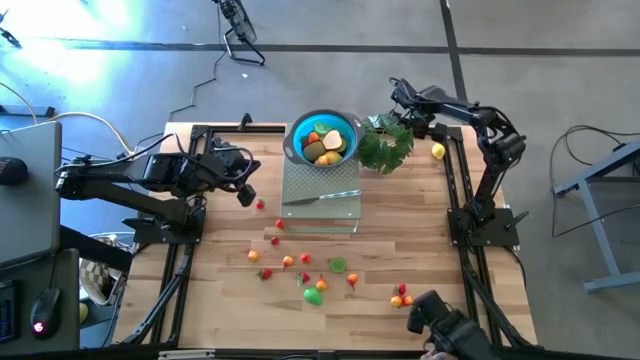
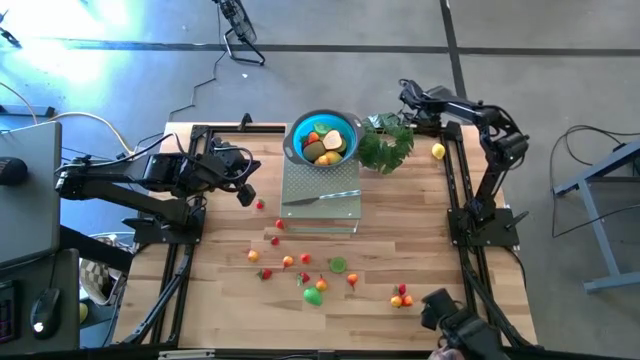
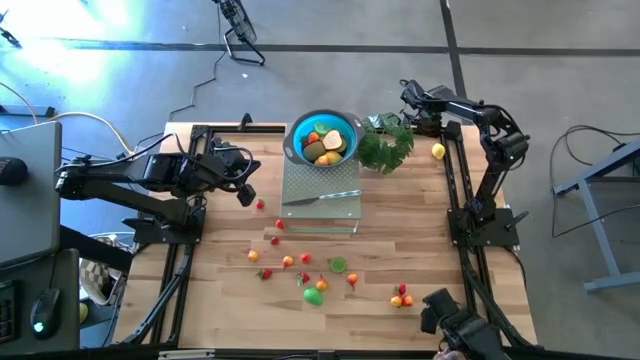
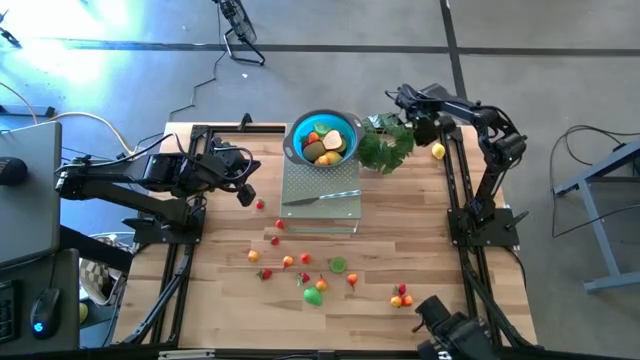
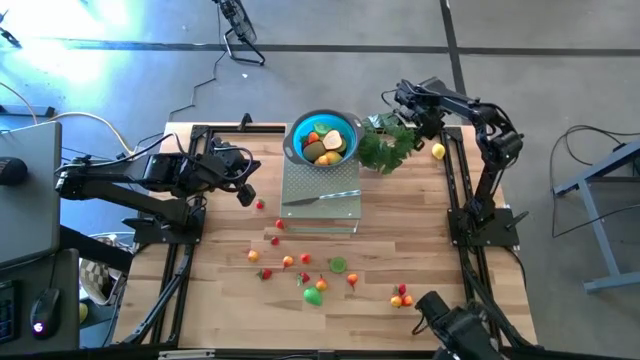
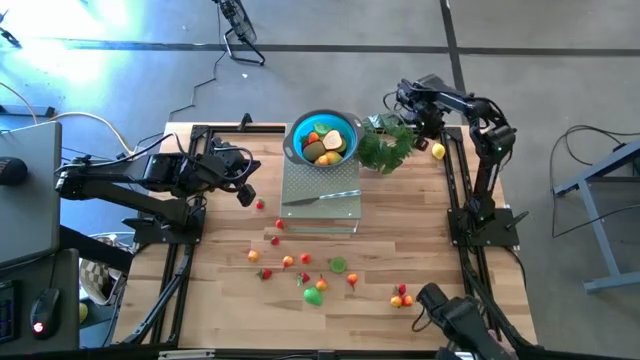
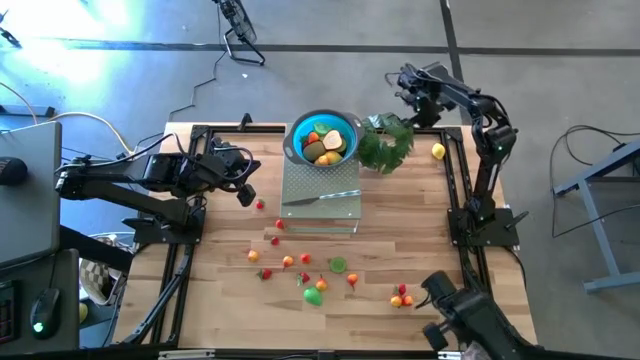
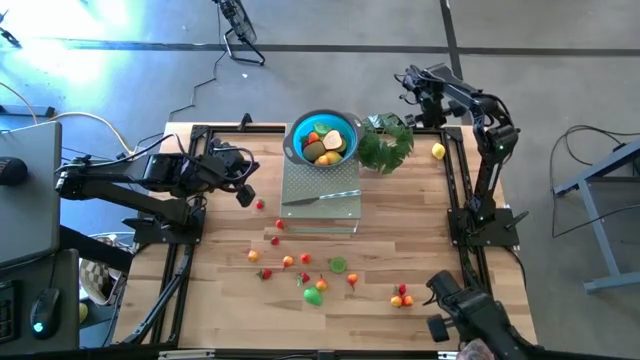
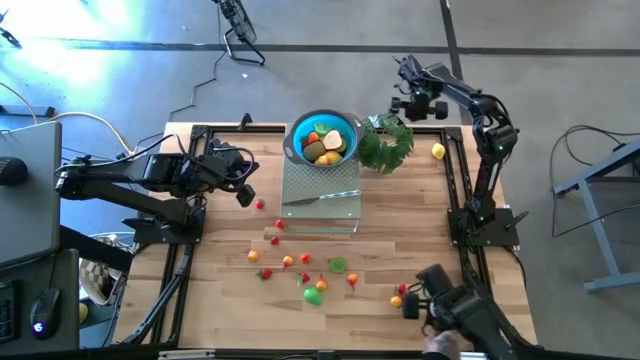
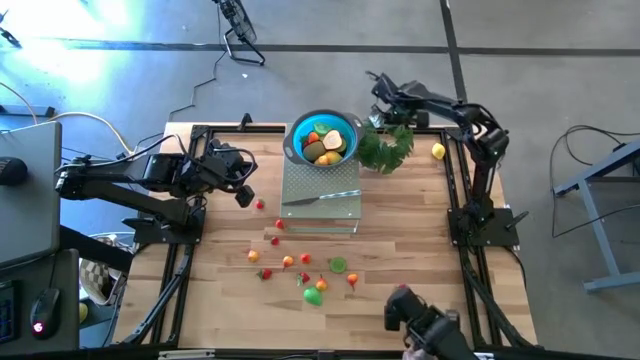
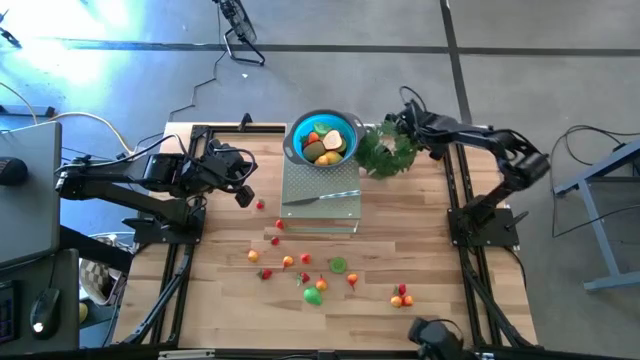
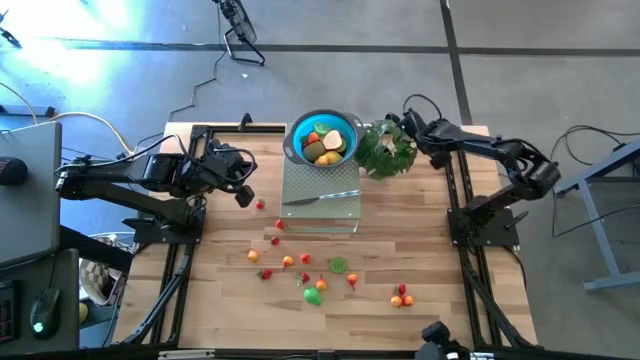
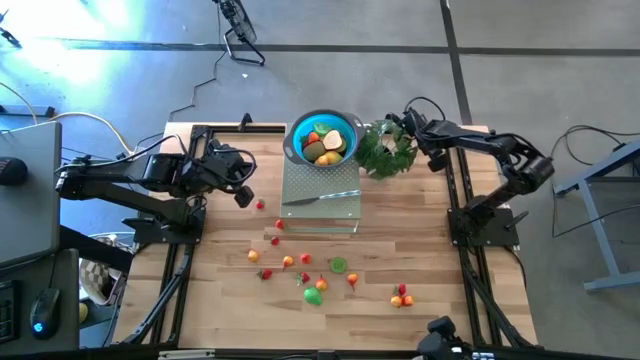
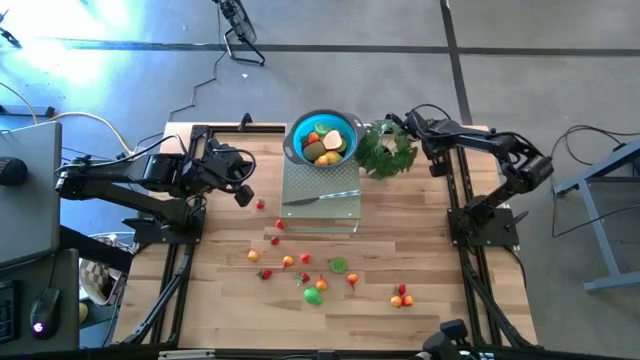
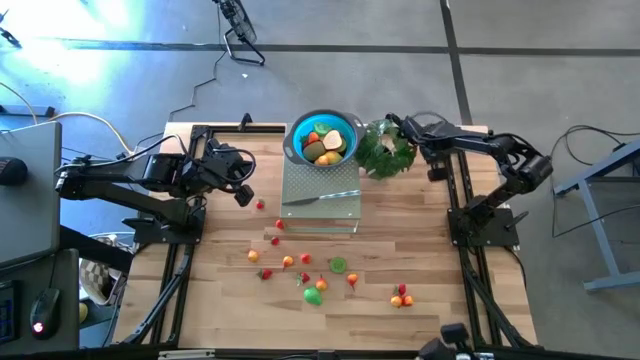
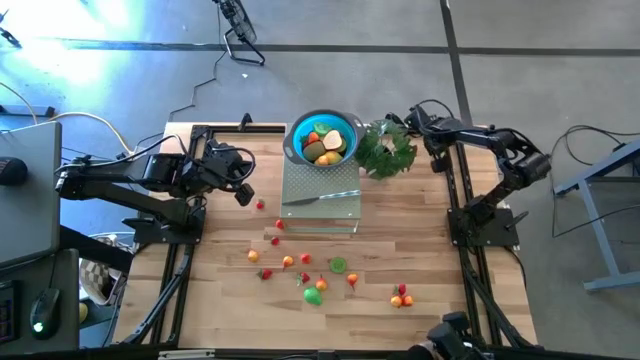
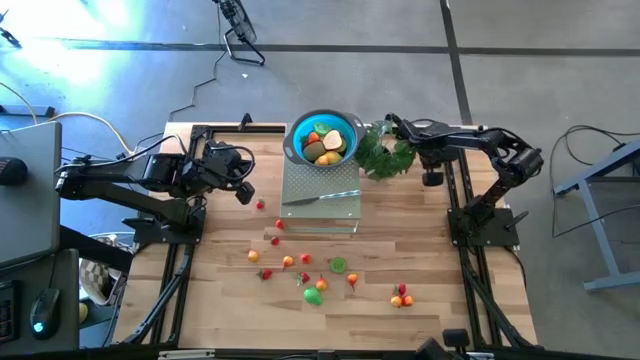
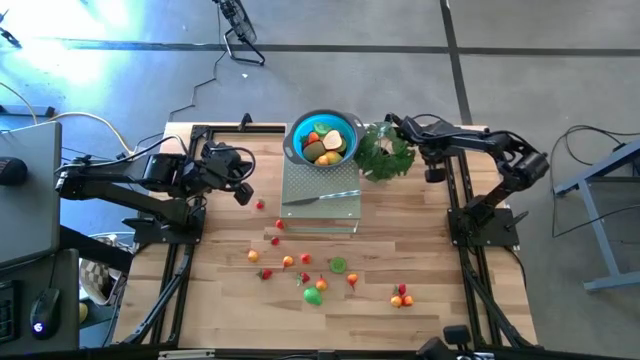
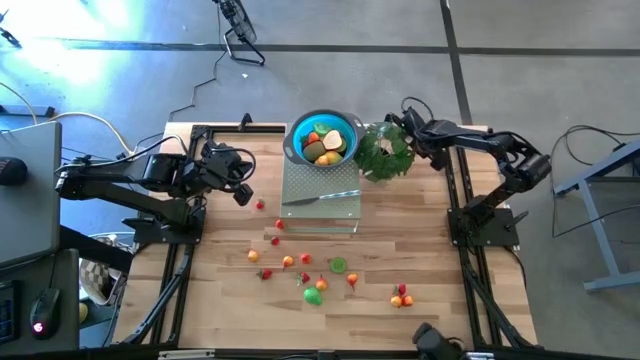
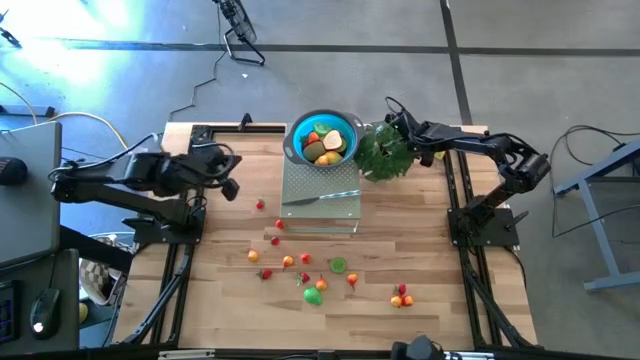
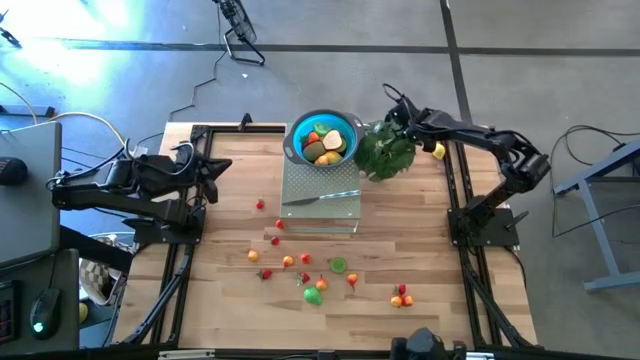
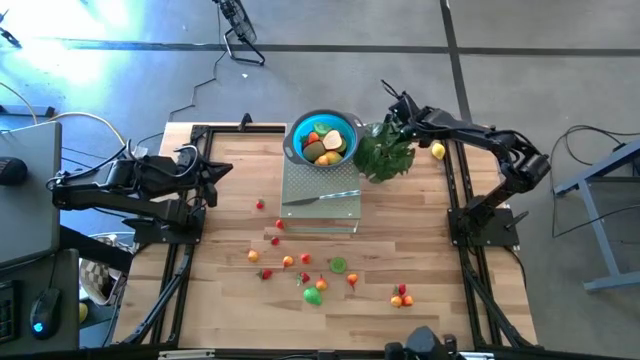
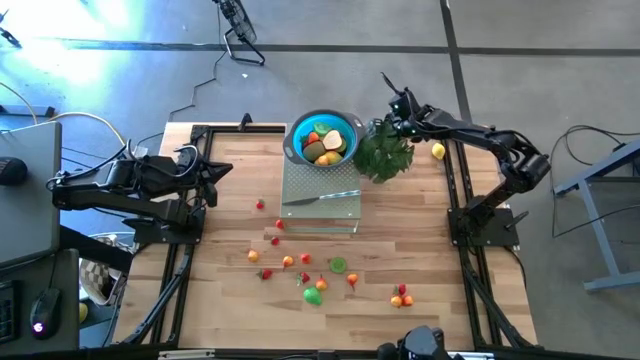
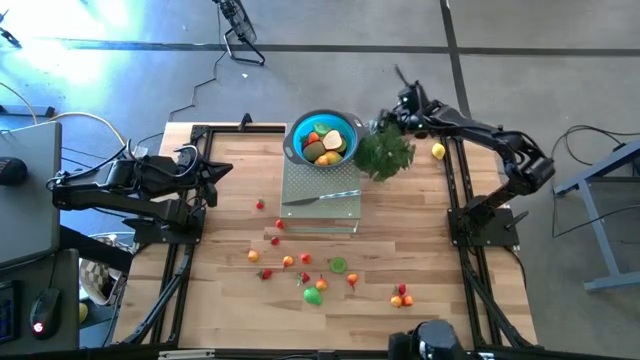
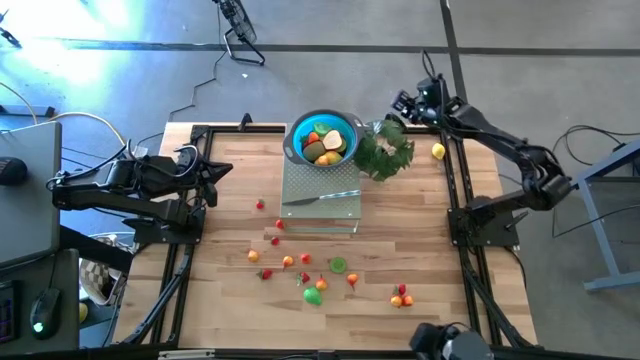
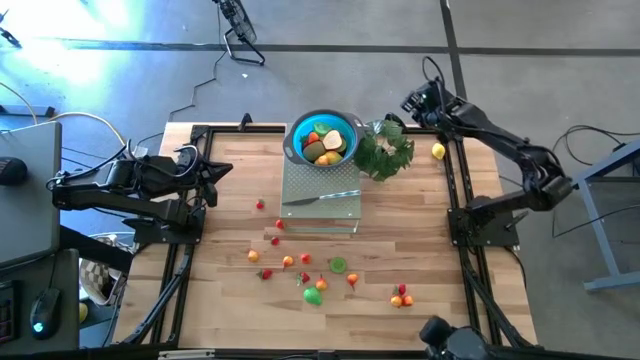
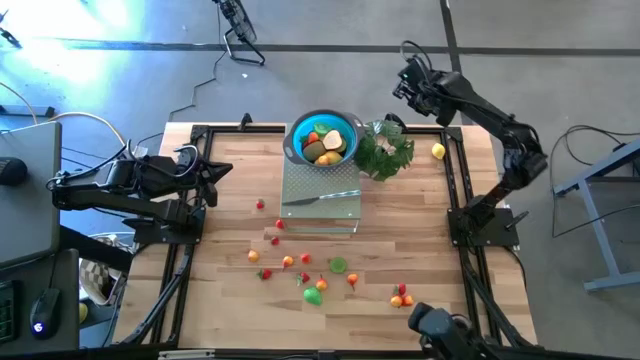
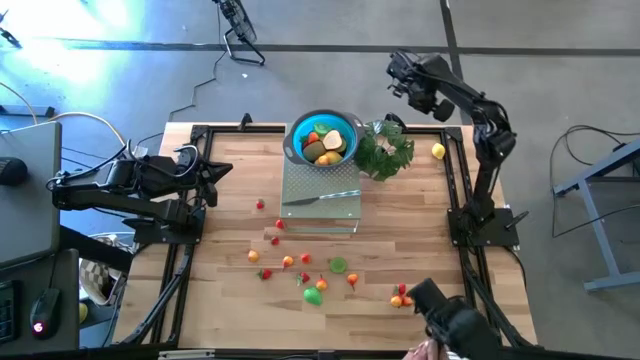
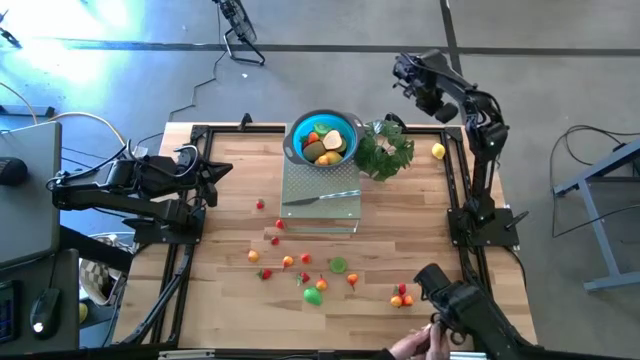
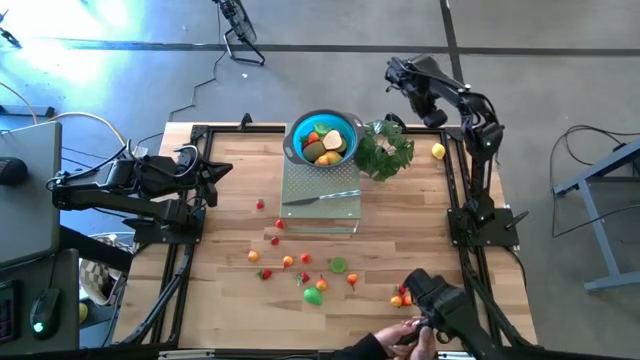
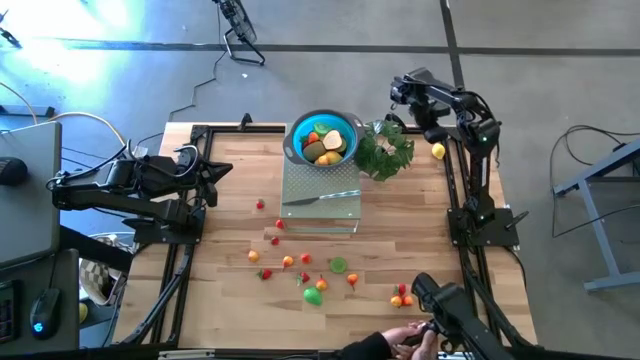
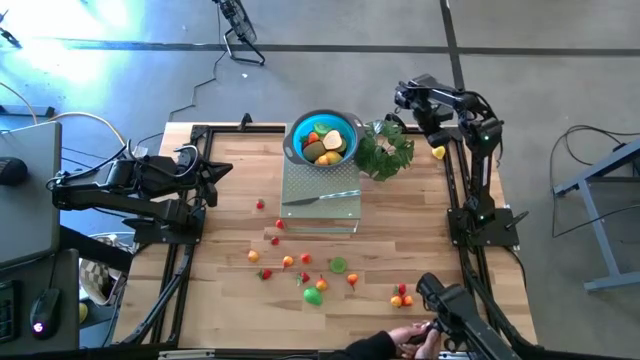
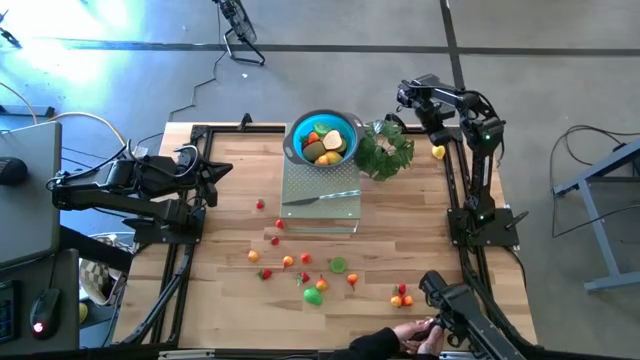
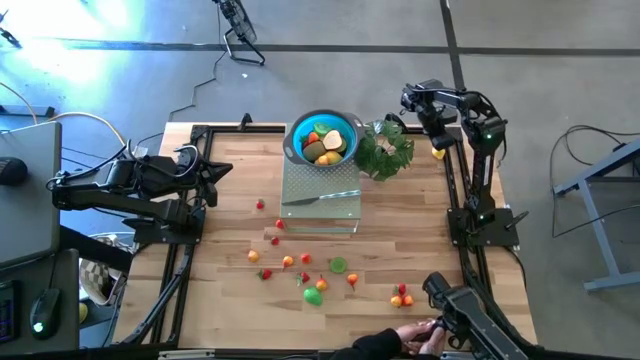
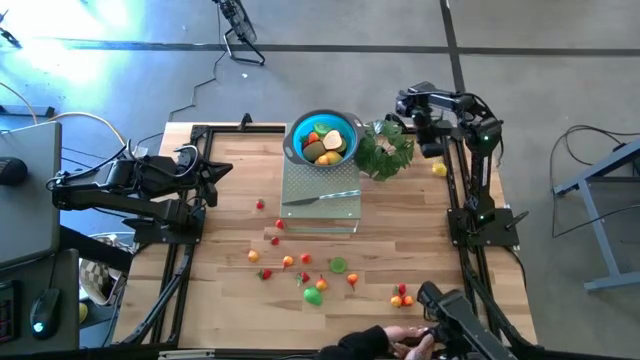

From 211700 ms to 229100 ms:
Task: Pick & Place Fruit
Put the yellow lemon in the blue bowl on the shelf

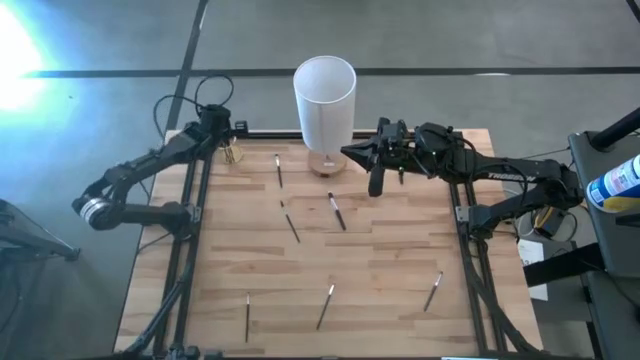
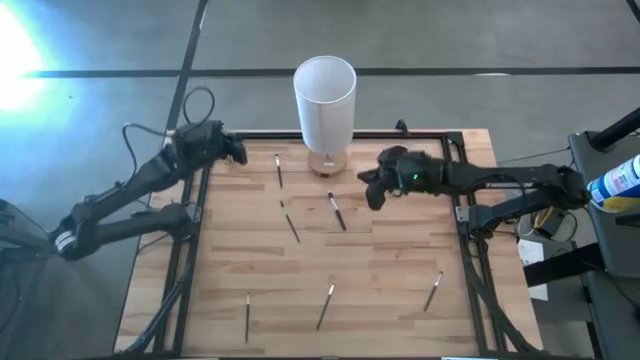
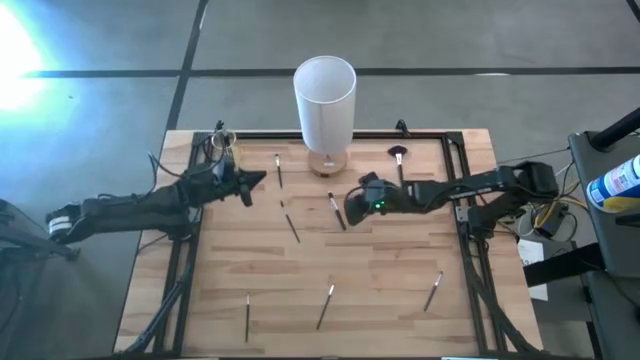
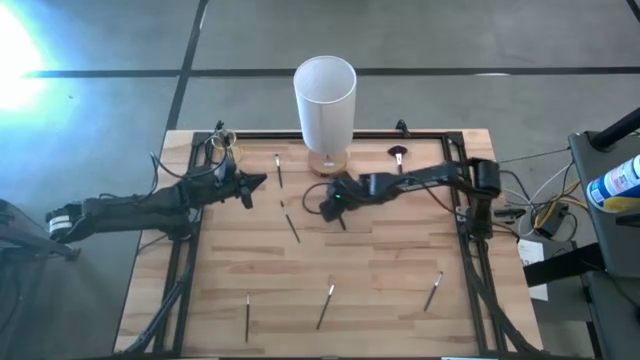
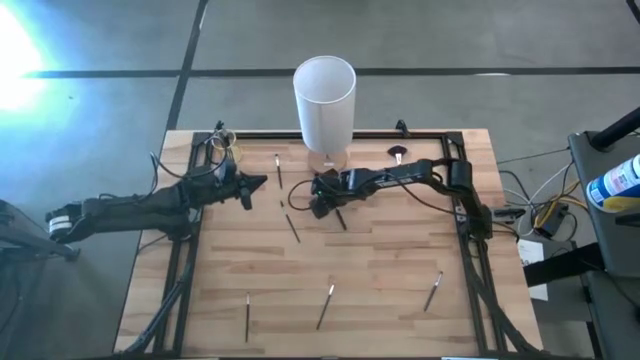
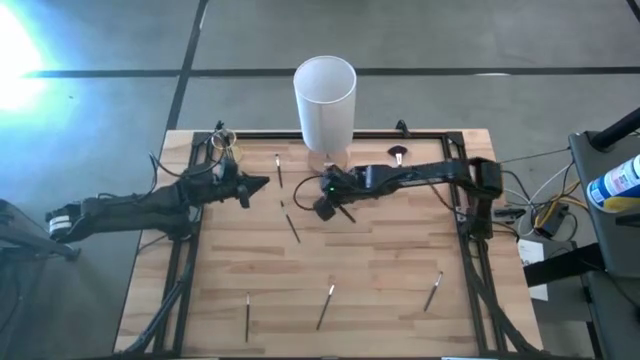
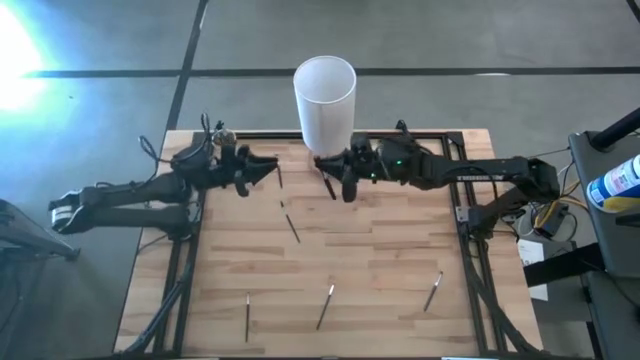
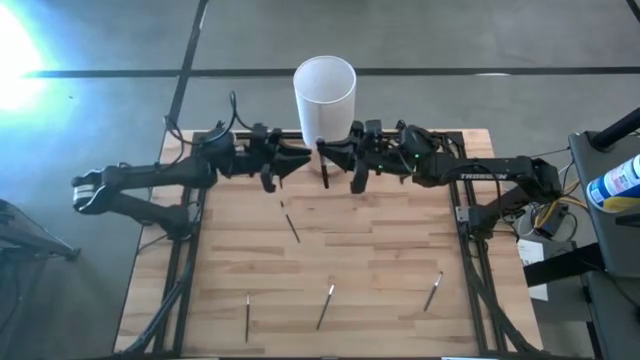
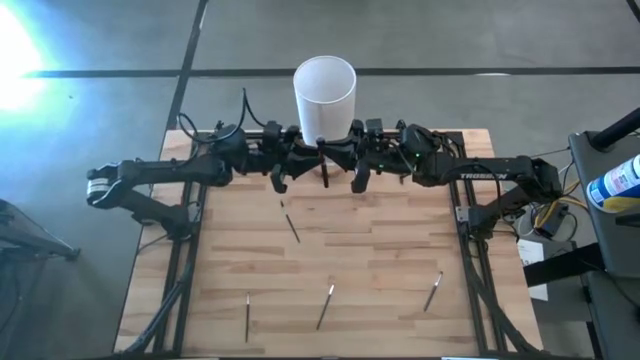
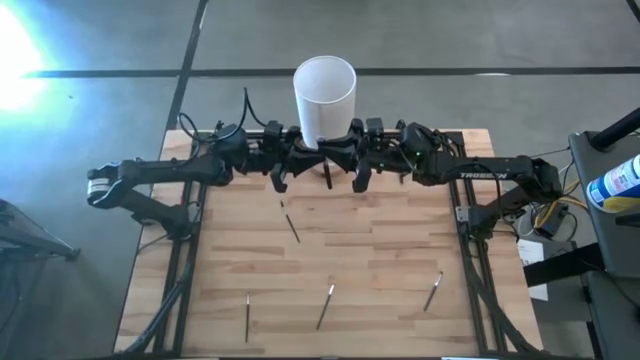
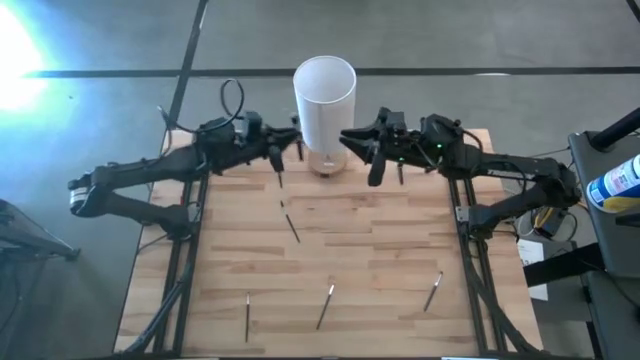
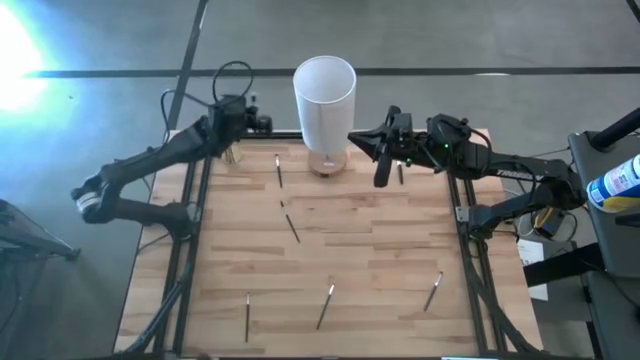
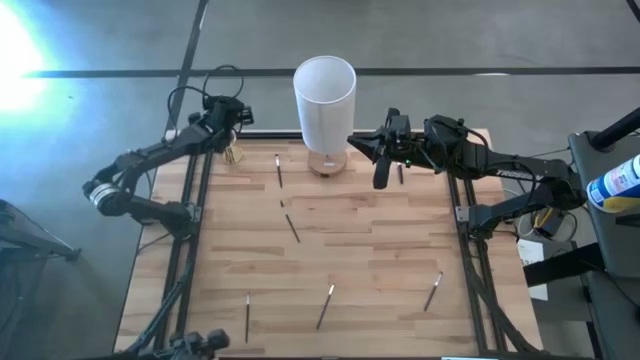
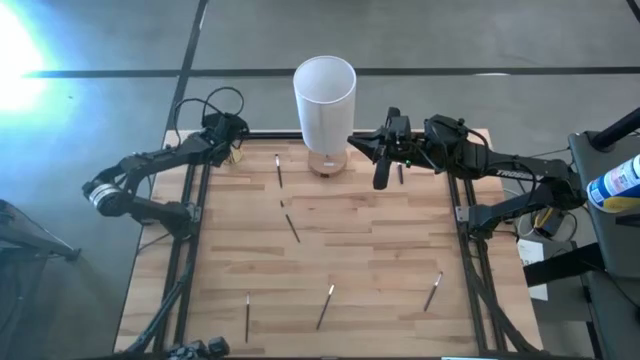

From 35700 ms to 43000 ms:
Task: Pick & Place Makeup Brushes
Put the foundation brush into the makeup holder
